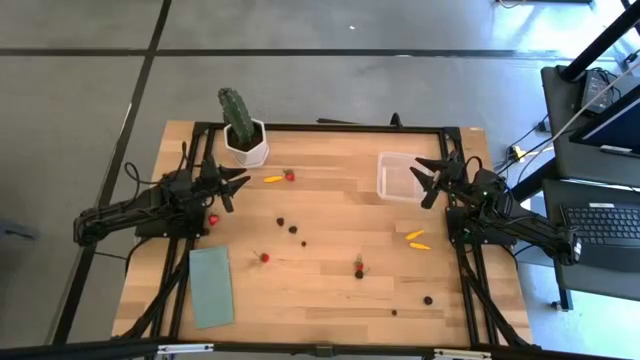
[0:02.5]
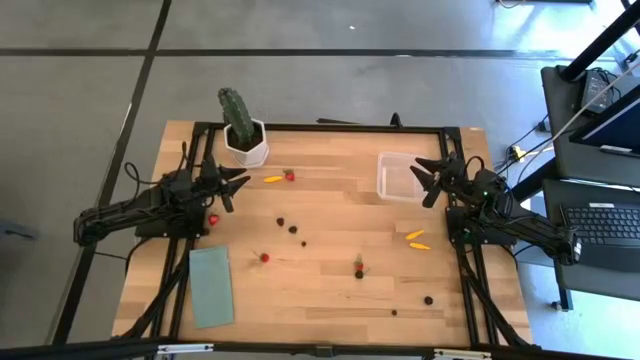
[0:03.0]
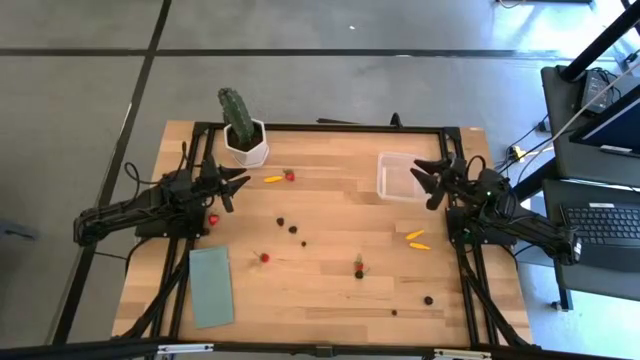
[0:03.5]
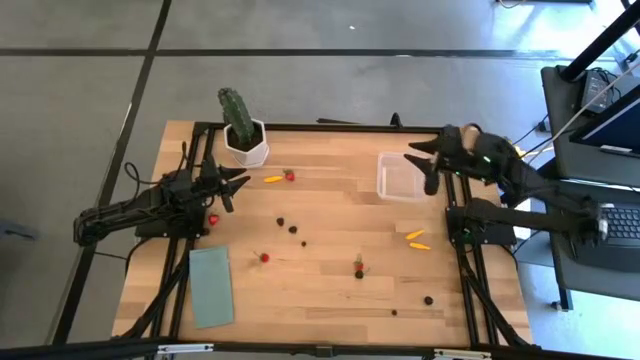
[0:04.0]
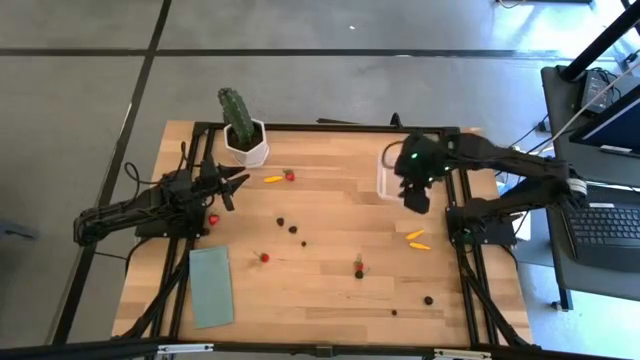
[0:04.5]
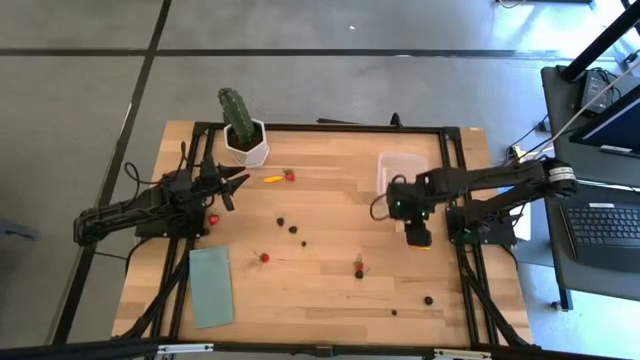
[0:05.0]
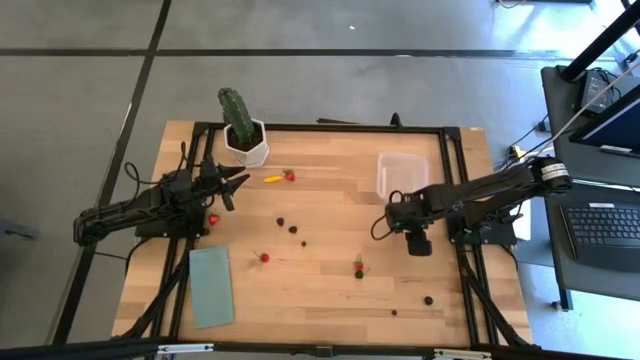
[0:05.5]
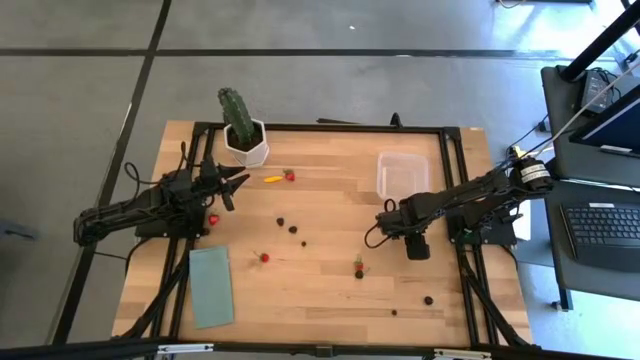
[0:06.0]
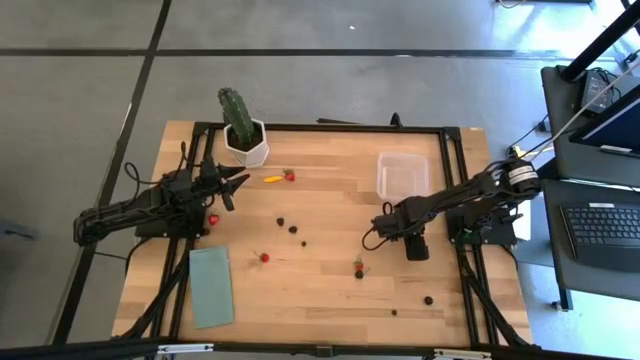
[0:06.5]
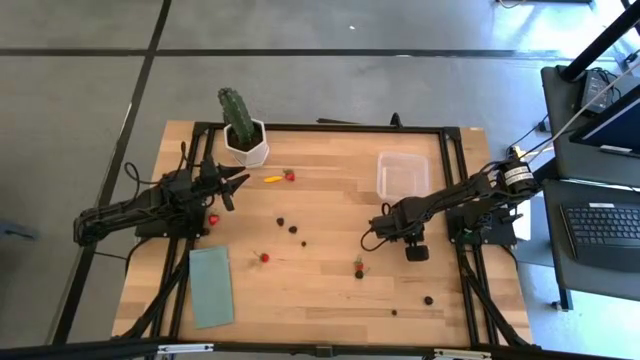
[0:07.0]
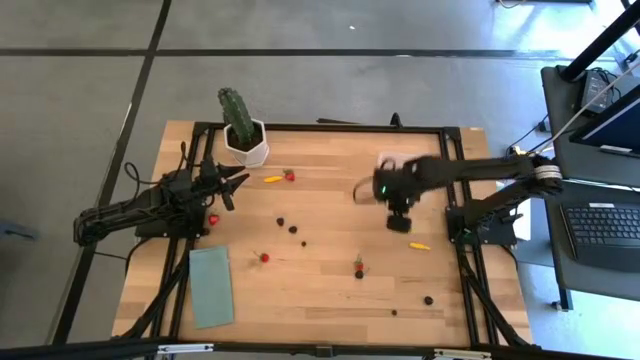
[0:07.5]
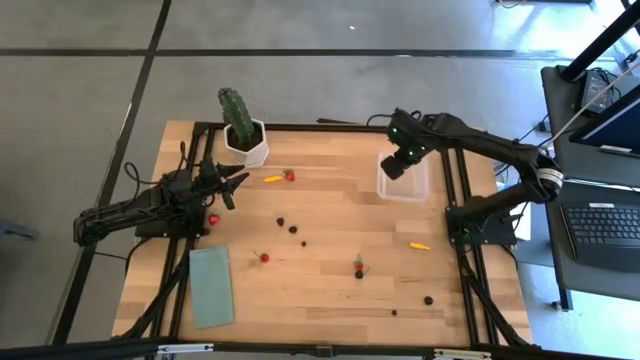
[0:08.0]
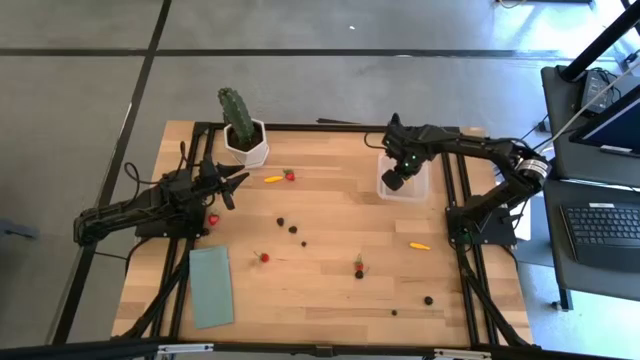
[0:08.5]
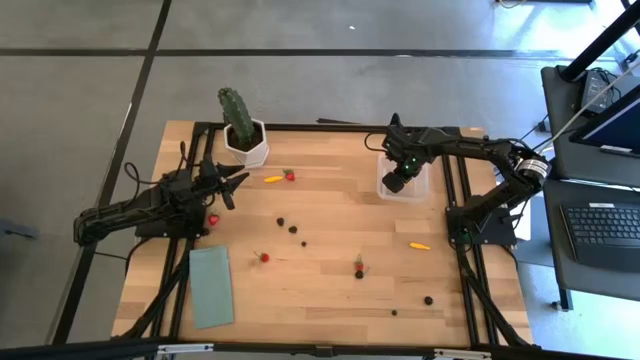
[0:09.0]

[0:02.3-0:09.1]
Task: Pick and placing Produce into tupperware
Put the middle yellow corn into the transparent bin

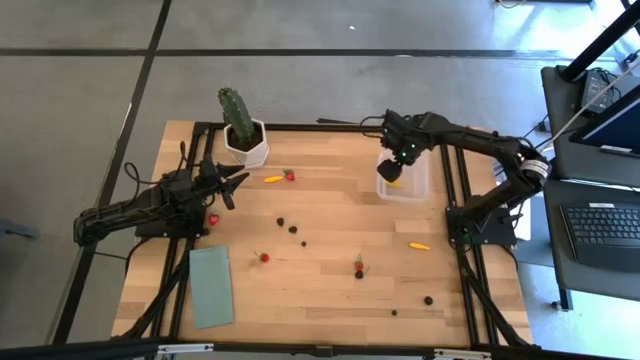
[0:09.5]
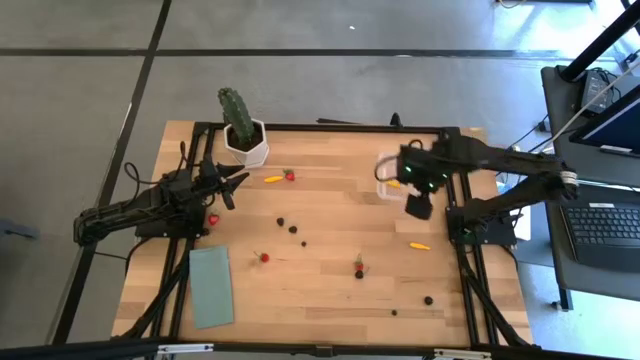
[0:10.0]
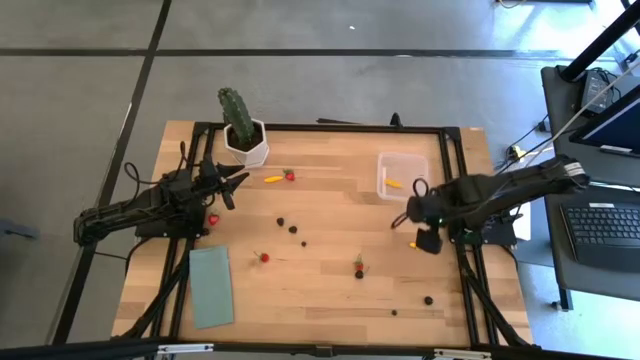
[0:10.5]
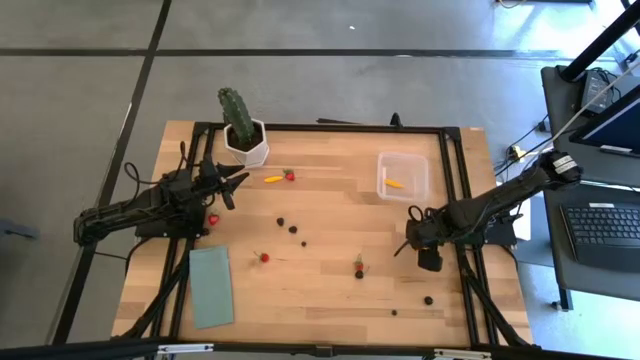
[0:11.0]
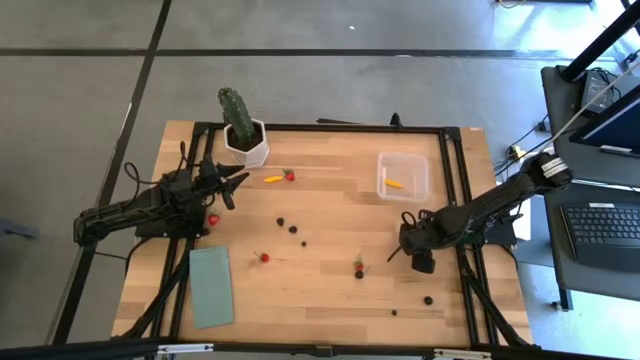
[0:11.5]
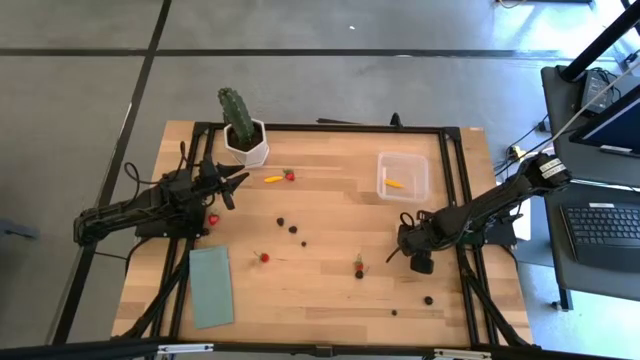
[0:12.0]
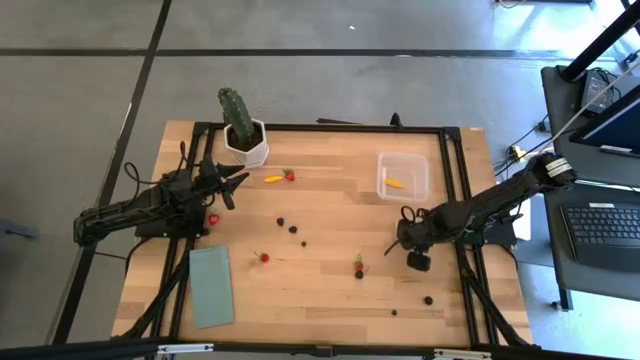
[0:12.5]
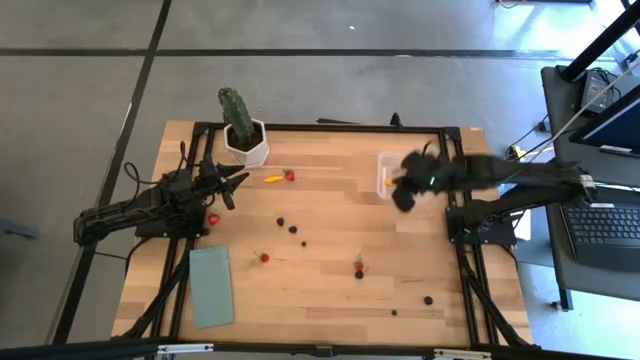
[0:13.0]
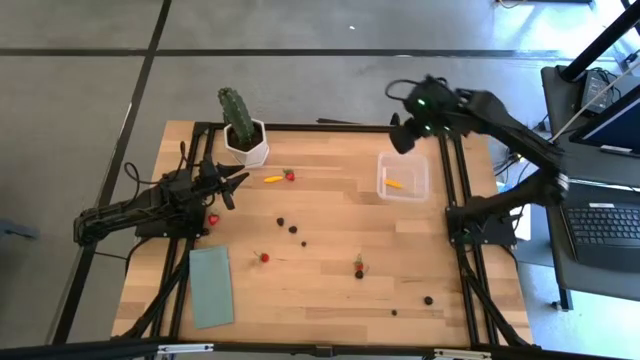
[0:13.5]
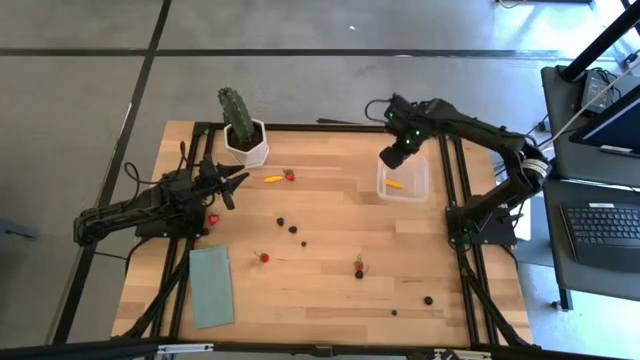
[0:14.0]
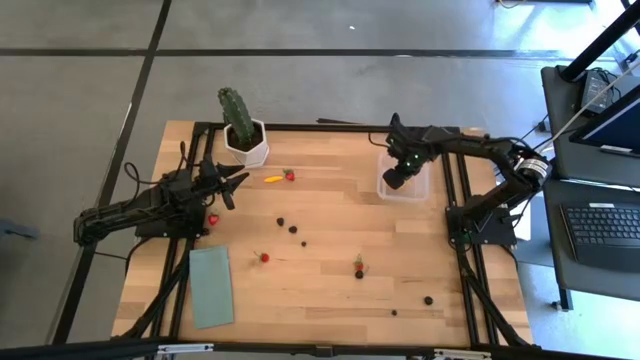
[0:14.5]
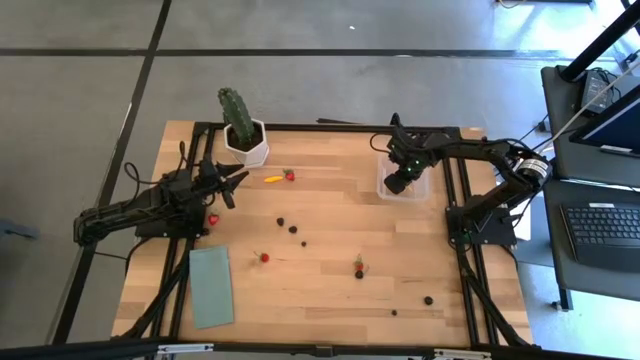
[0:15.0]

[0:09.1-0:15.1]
Put the bottom yellow corn into the transparent bin

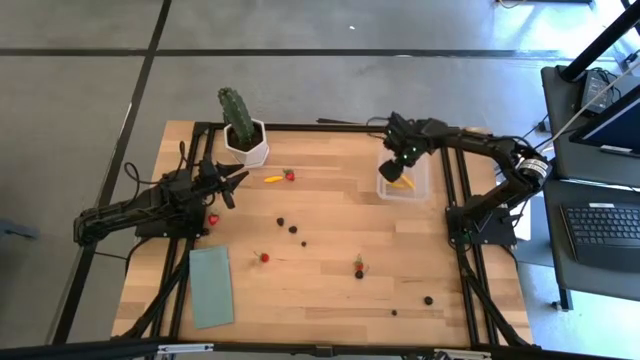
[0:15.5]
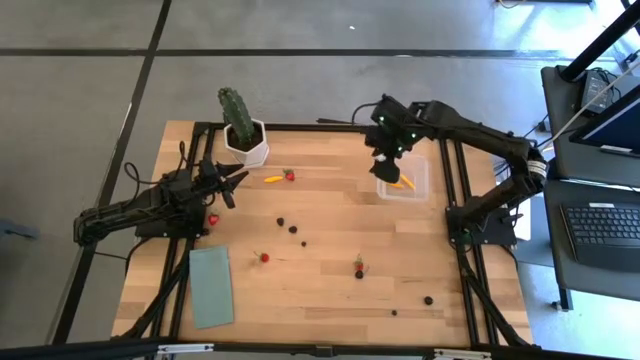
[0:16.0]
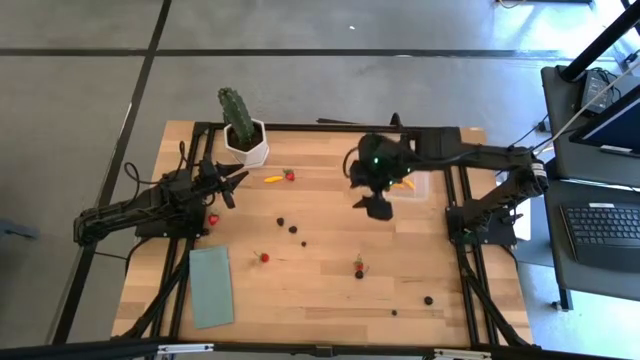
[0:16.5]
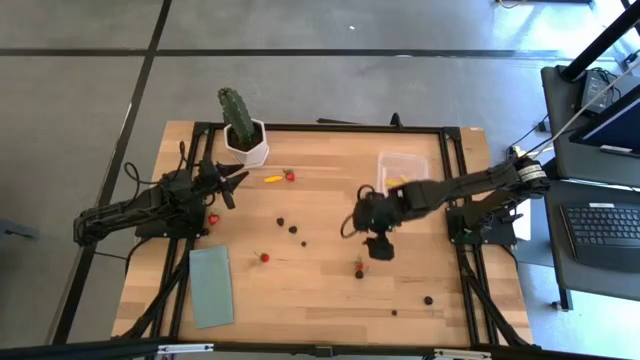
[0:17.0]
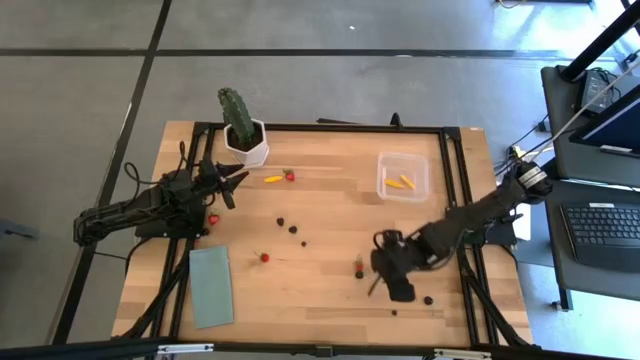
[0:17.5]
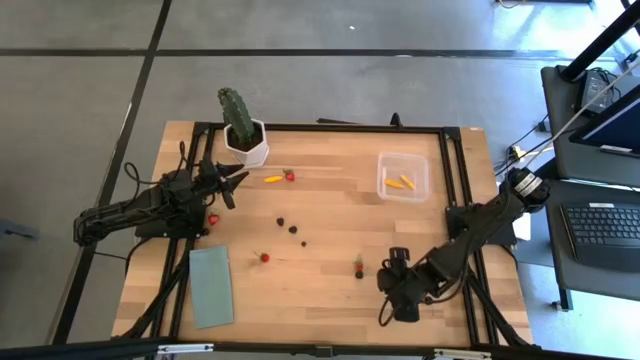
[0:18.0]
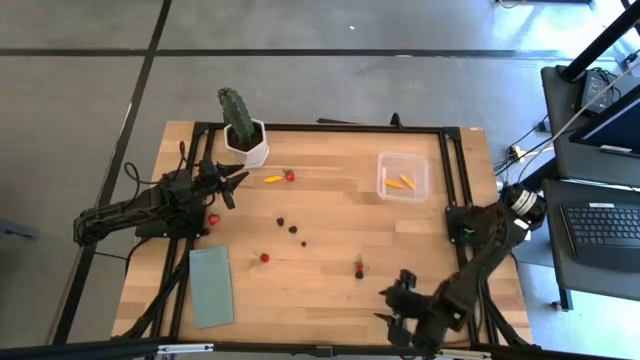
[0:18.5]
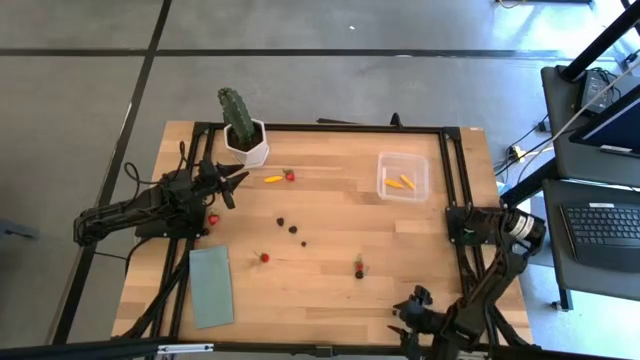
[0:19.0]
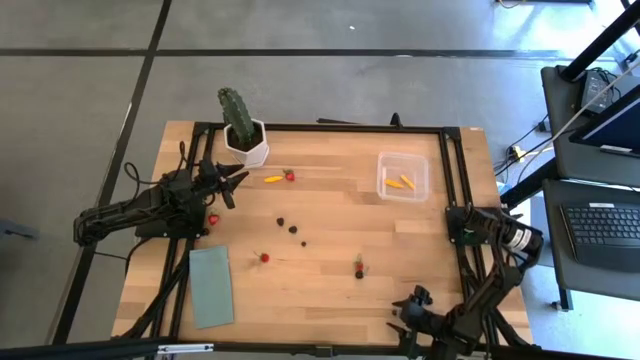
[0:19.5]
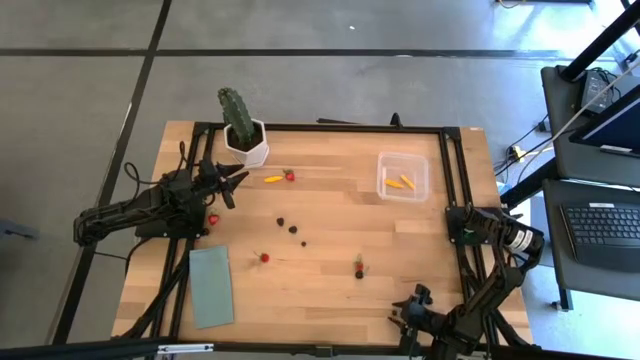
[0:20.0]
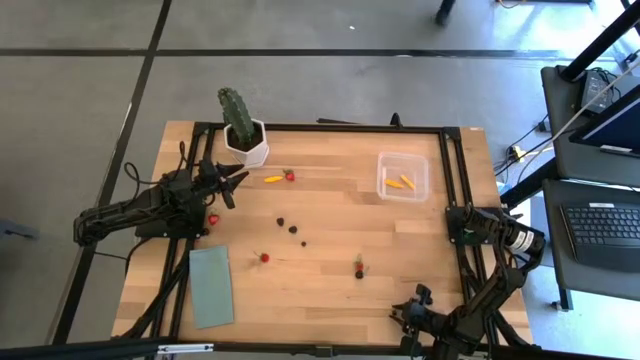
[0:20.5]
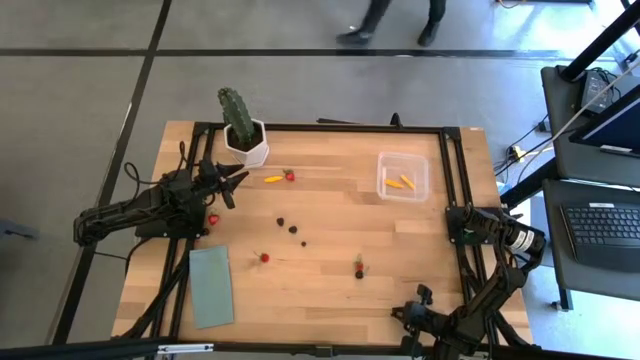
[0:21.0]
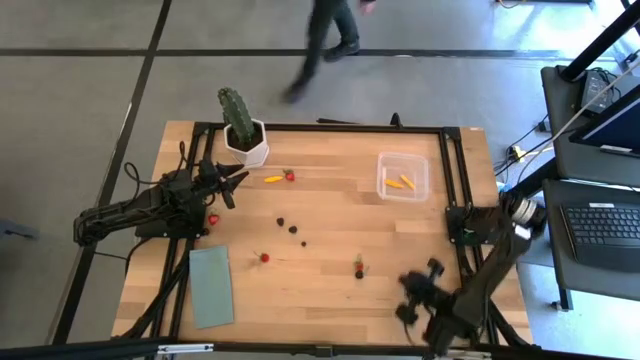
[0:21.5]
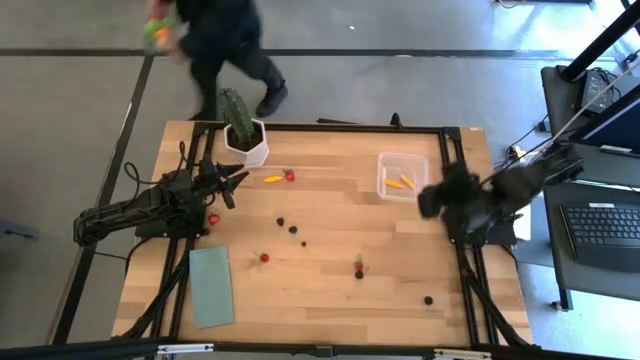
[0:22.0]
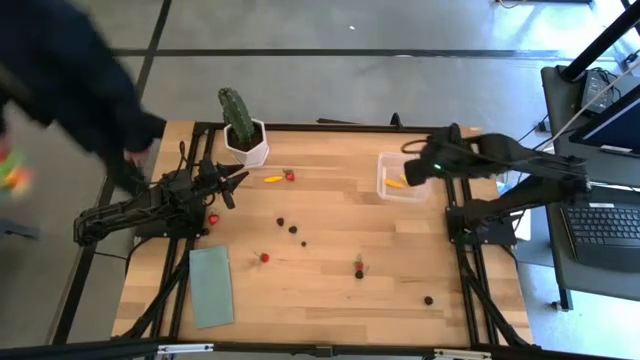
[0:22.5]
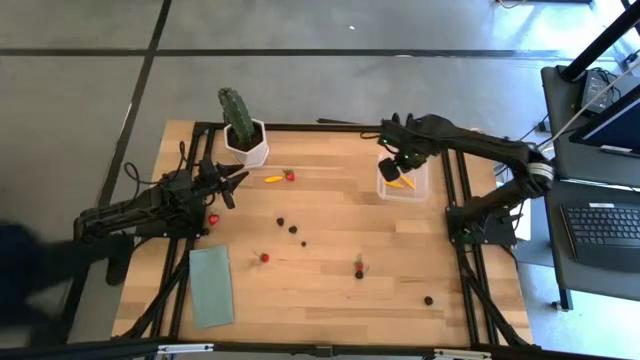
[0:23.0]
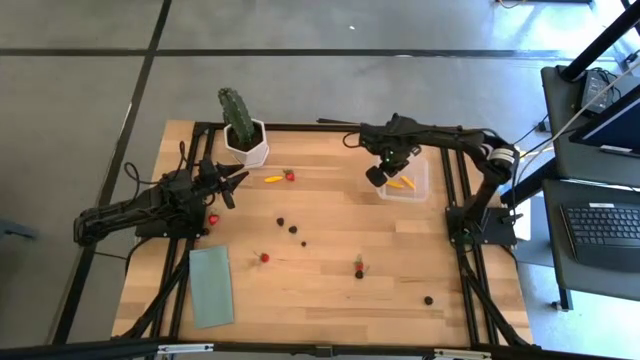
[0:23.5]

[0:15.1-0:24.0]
Put the bottom black blueberry into the transparent bin
